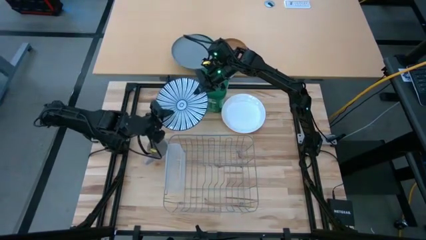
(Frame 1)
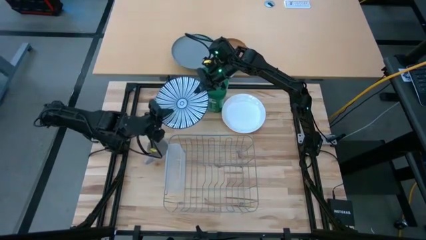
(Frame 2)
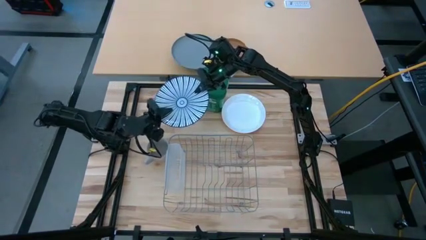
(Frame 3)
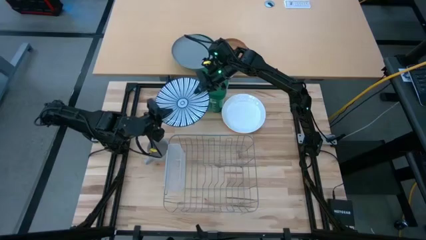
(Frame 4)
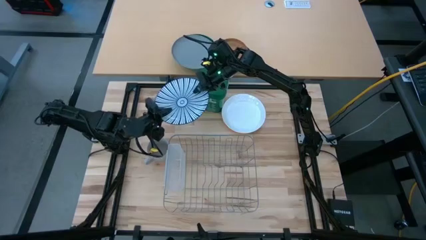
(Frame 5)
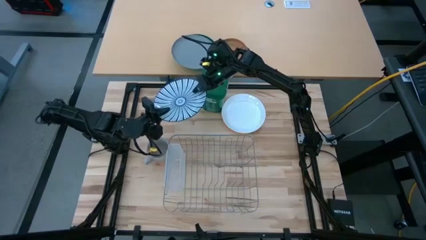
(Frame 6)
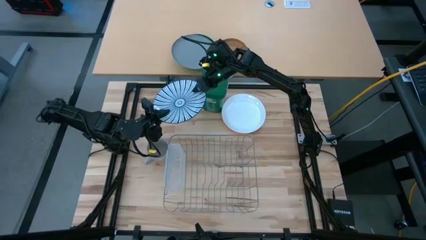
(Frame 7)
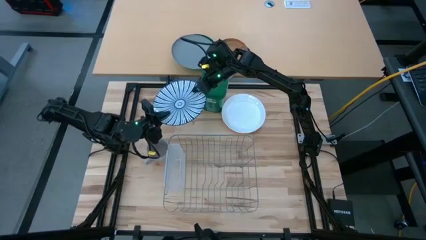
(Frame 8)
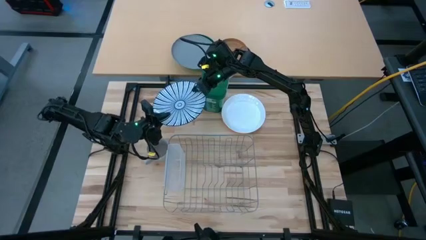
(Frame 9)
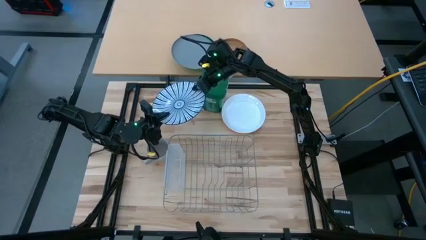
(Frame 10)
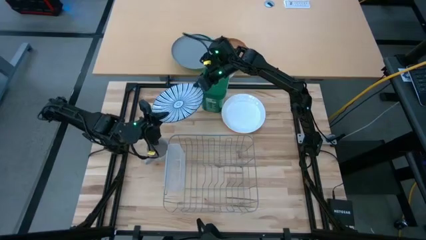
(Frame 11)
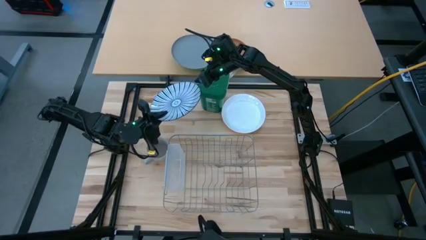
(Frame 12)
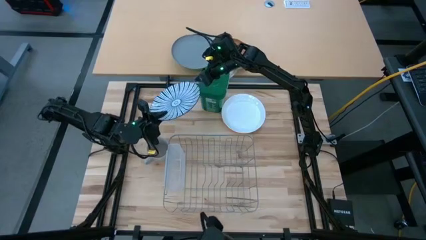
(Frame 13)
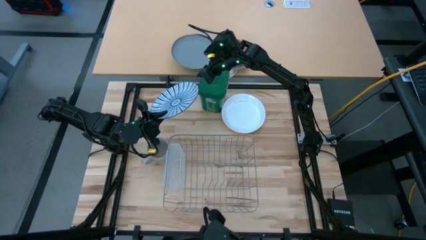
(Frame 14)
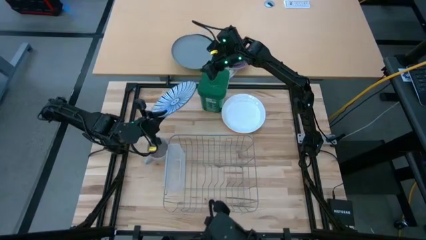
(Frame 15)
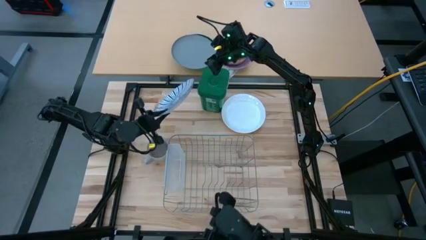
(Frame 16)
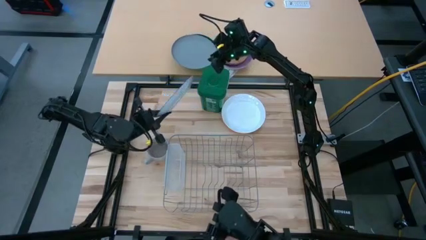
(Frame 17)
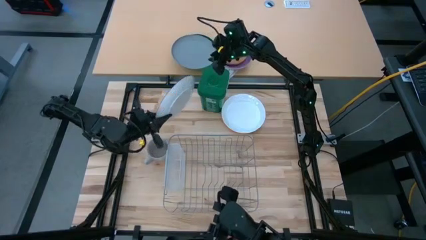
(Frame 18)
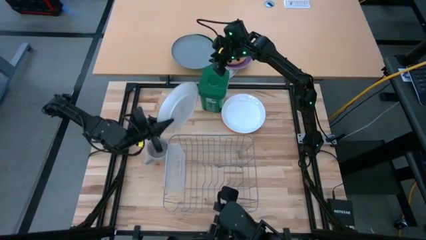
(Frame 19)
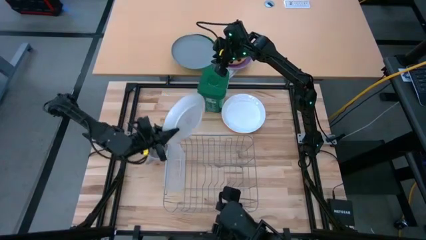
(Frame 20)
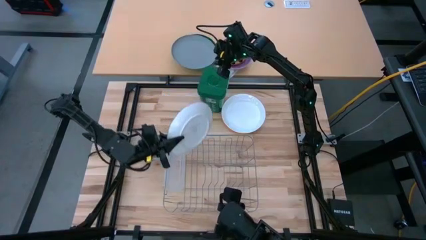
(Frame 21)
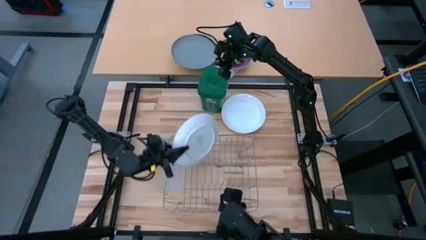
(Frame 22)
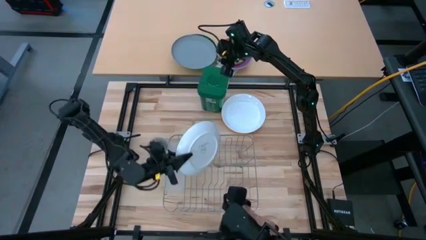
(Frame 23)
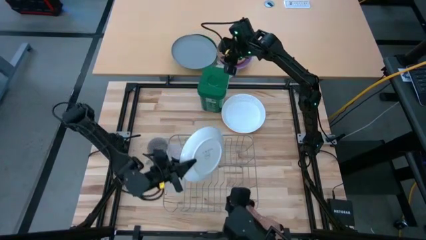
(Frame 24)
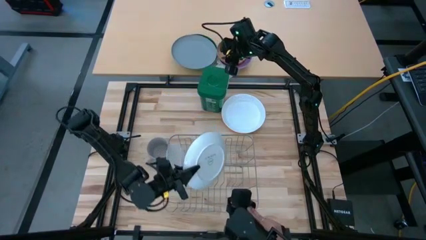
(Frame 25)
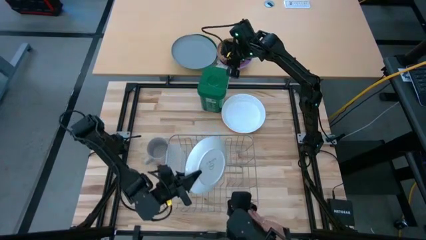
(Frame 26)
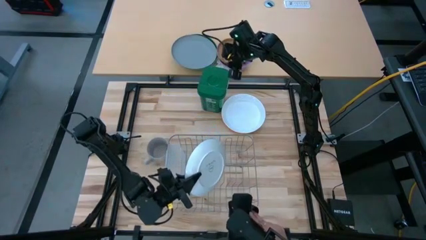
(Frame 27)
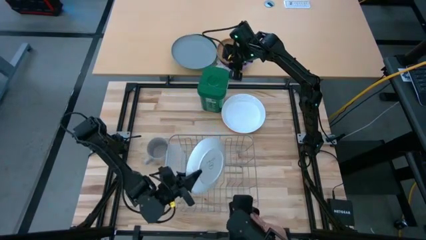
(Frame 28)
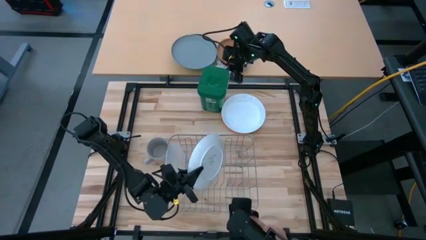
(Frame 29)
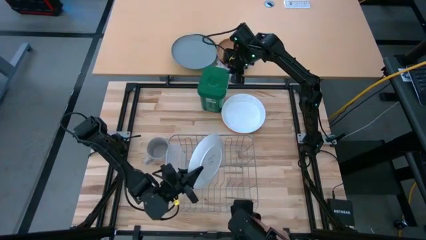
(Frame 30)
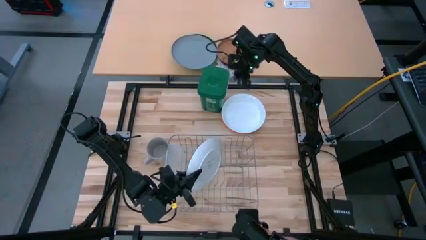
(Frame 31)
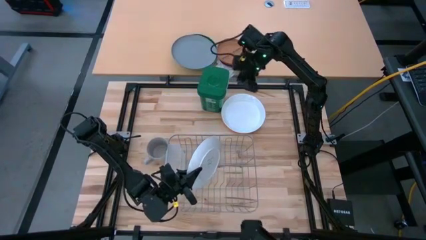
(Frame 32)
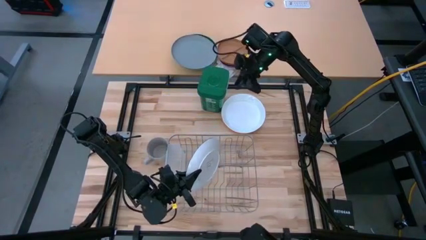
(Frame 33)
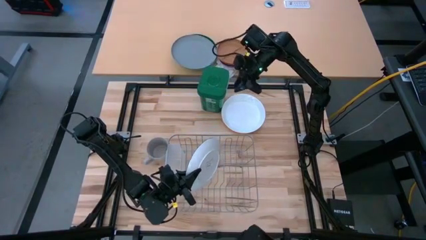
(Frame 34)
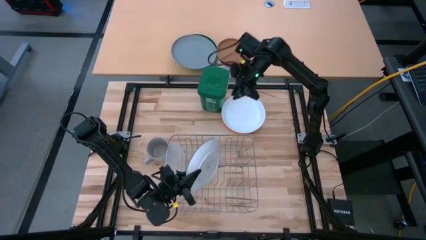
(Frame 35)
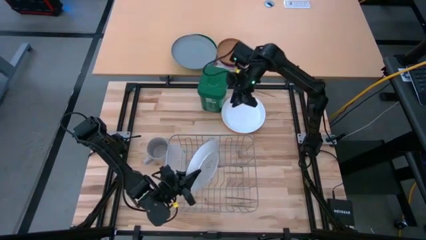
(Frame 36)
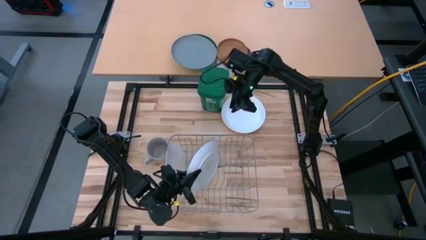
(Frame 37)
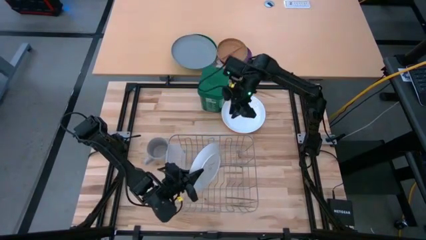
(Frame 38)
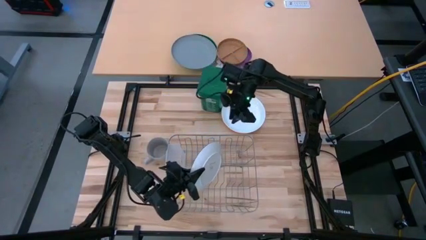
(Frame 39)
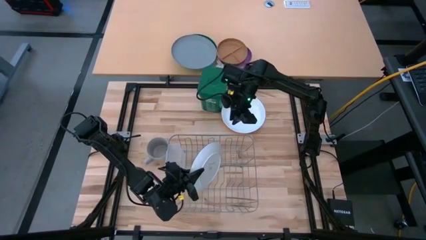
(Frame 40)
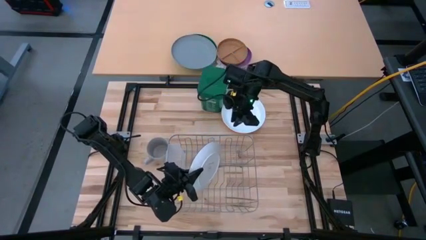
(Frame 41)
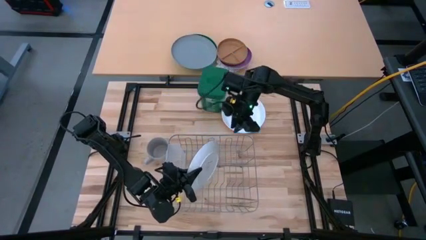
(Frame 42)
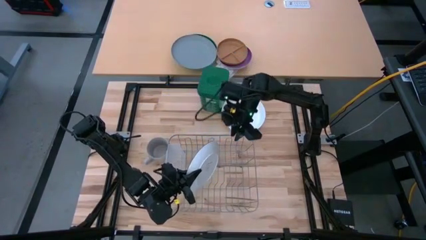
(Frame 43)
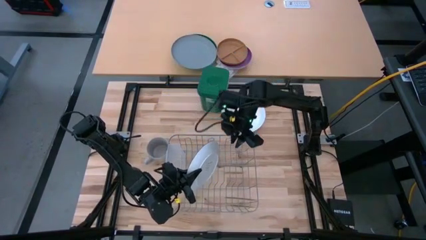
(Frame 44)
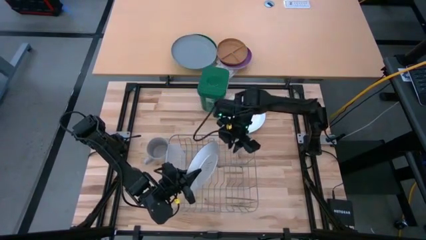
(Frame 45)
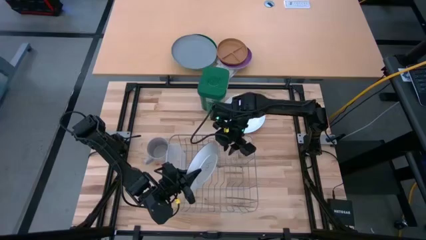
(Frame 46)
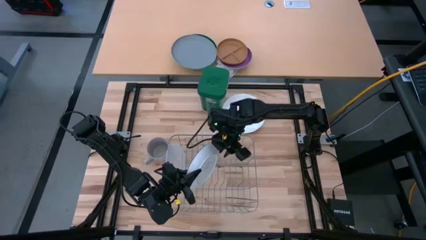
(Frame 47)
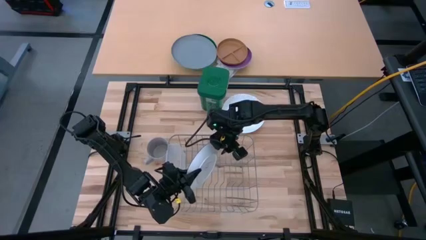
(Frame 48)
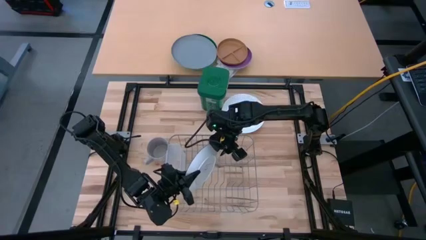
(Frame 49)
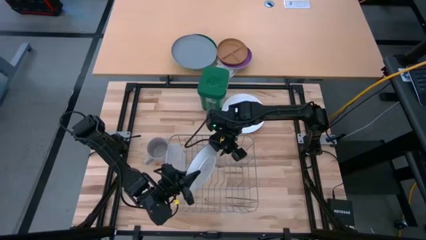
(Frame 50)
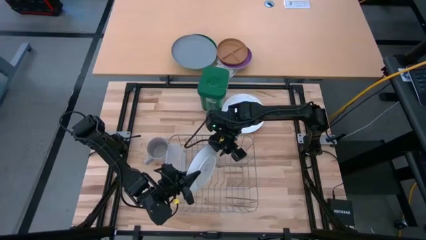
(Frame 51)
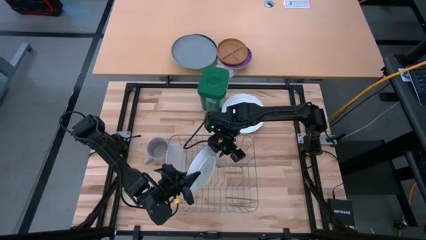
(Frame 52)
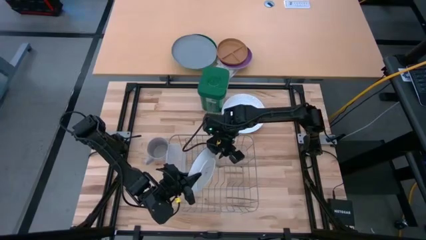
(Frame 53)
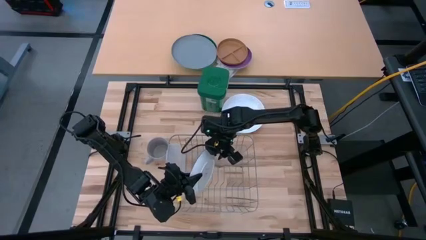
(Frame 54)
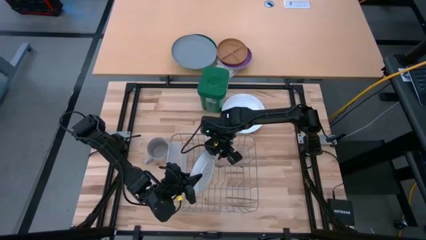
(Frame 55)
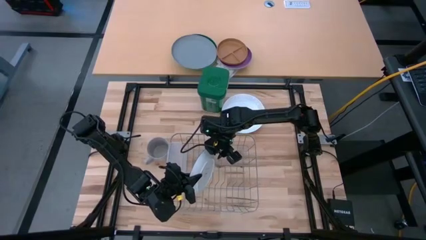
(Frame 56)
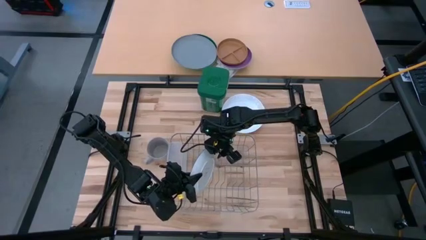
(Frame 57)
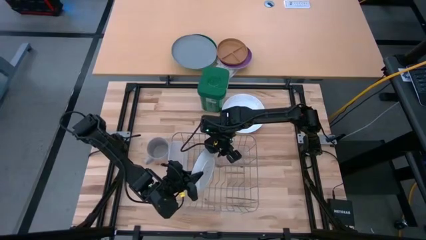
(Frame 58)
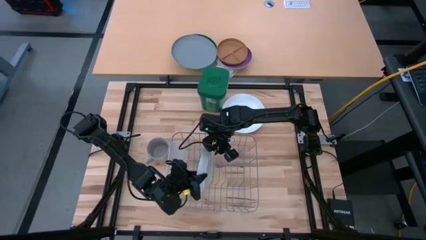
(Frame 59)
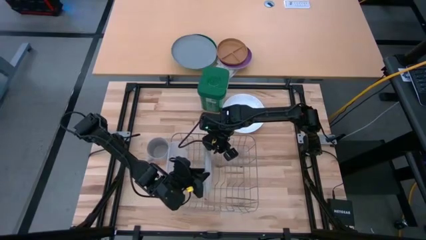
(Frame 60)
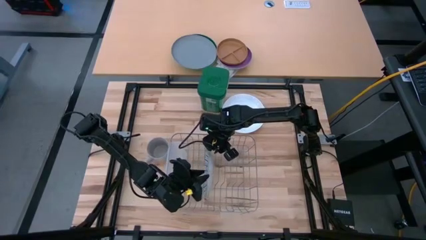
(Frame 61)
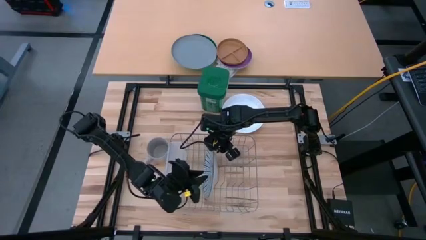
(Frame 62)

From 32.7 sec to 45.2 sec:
Task: Sort dishes
Put the blue plate in the dish rack

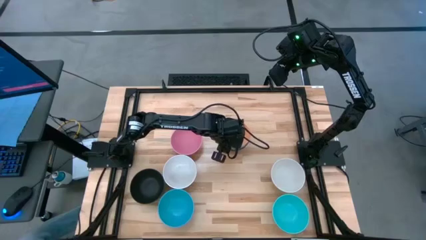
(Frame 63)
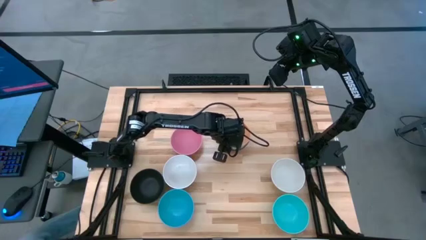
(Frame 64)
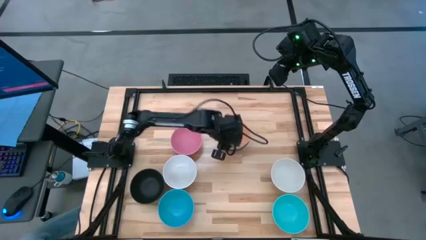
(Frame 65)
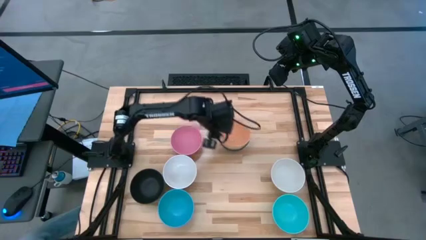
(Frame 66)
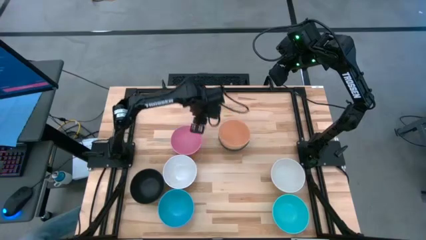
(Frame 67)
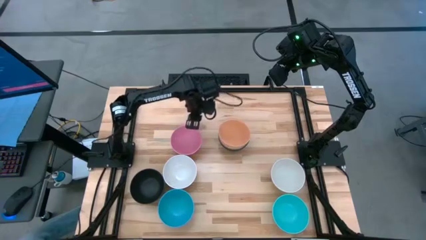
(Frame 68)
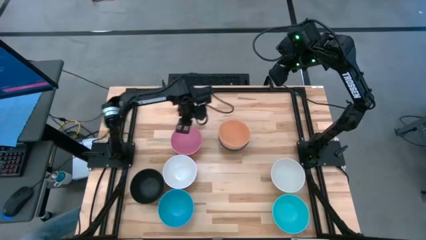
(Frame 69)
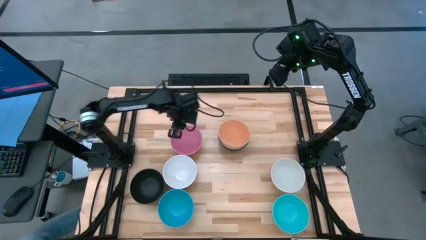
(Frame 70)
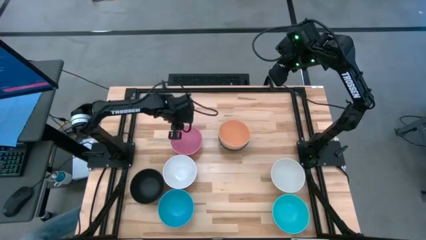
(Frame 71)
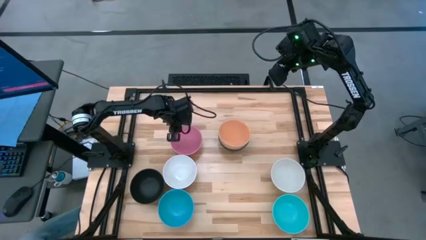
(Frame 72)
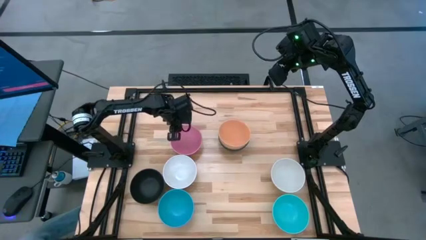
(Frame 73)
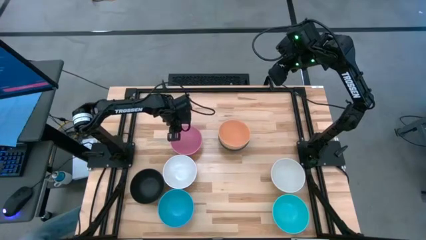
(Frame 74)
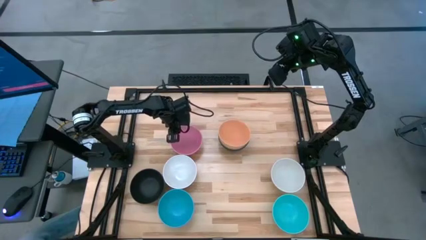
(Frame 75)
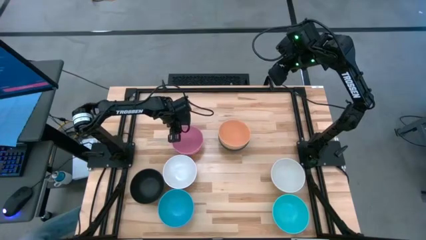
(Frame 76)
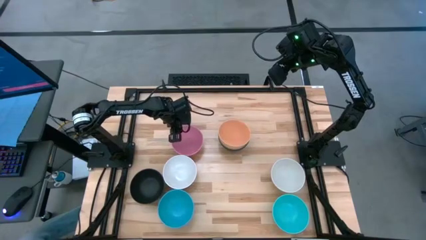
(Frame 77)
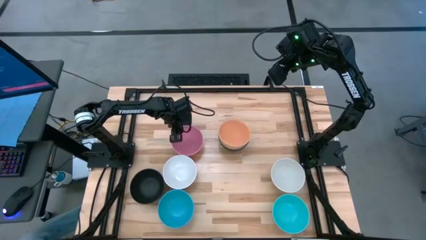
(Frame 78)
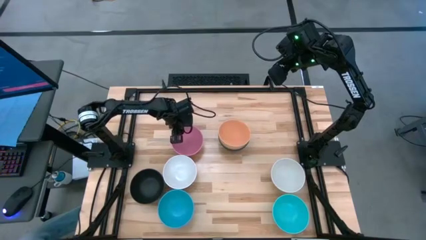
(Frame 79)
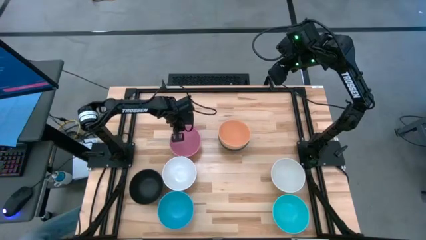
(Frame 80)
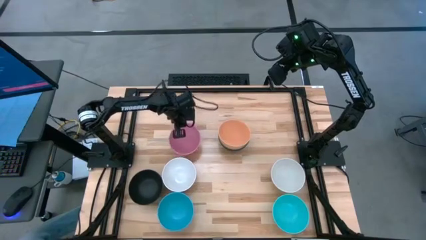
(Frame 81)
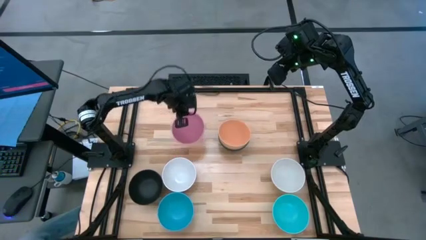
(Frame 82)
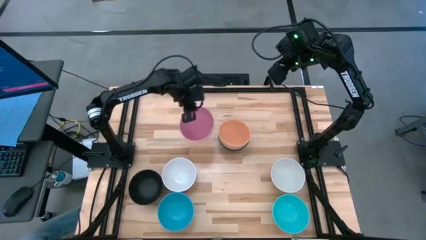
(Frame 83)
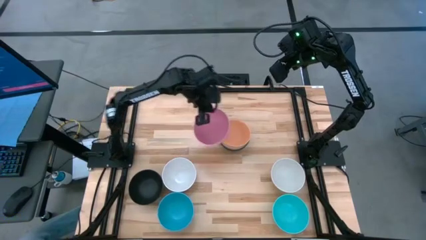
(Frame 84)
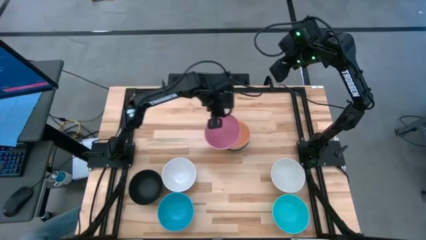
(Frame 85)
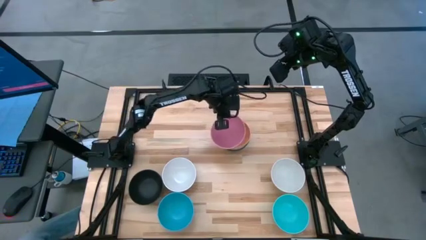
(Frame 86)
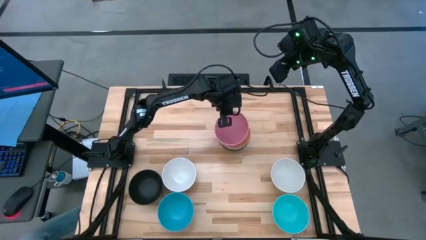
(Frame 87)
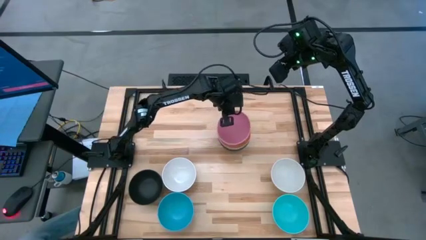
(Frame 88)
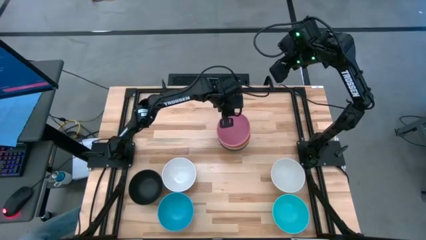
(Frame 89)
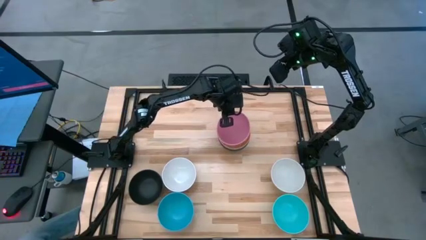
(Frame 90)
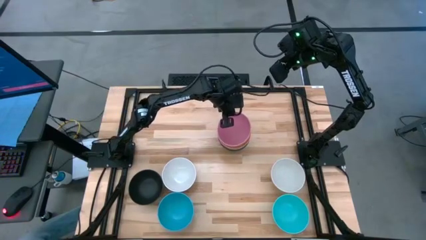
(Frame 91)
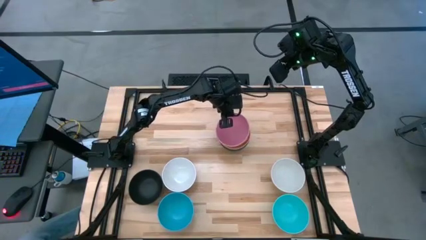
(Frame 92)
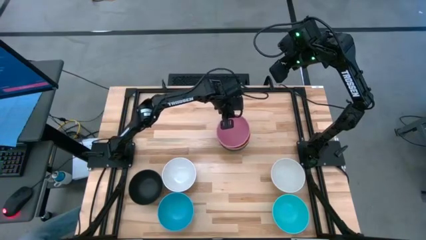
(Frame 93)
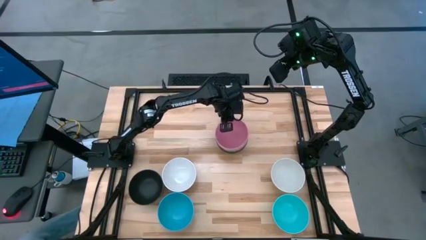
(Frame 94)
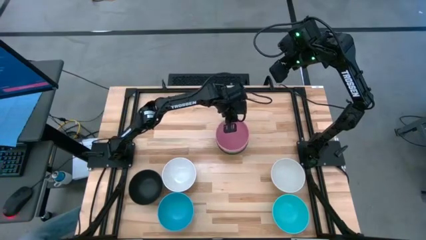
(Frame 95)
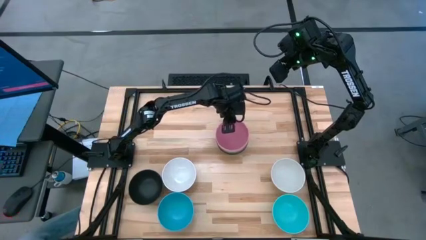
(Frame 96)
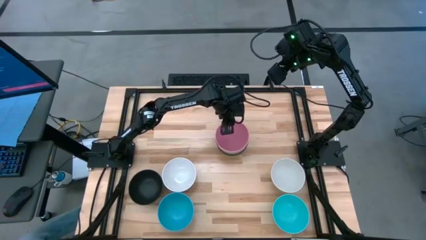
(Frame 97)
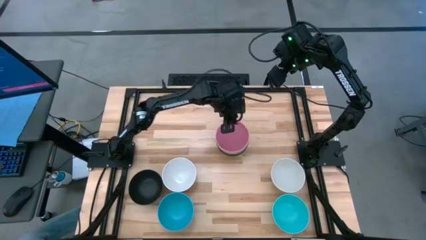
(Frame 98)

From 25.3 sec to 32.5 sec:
Task: Nest bowls inside each other
Stack the pink bowl on top of the orange bowl
